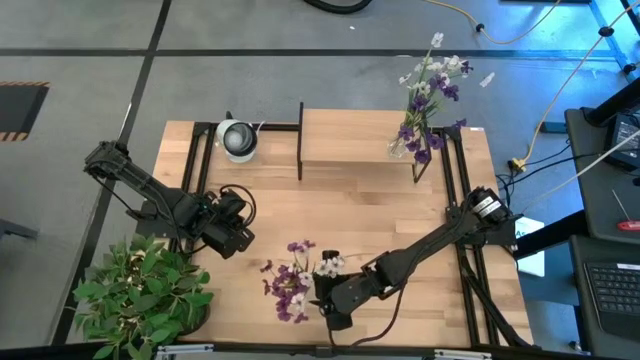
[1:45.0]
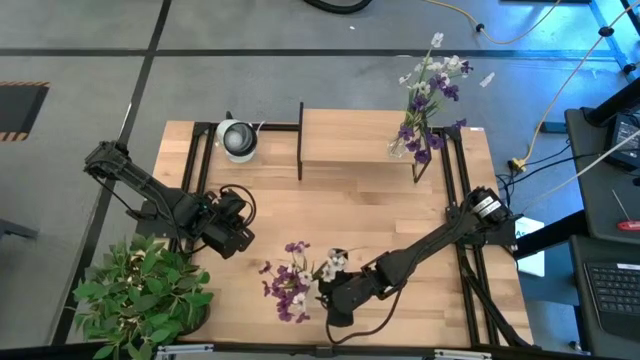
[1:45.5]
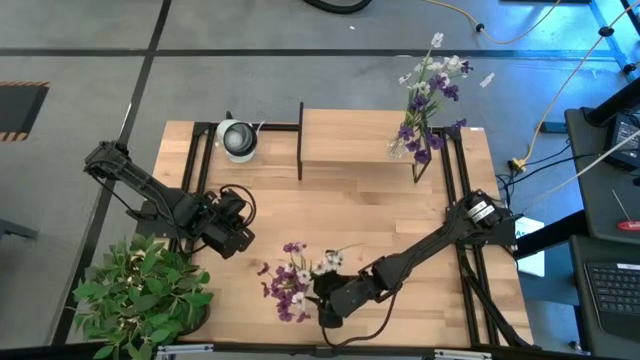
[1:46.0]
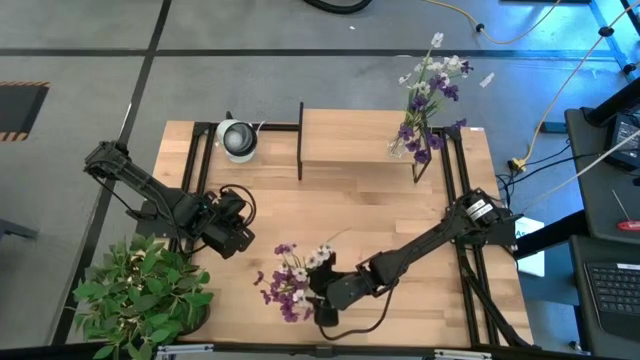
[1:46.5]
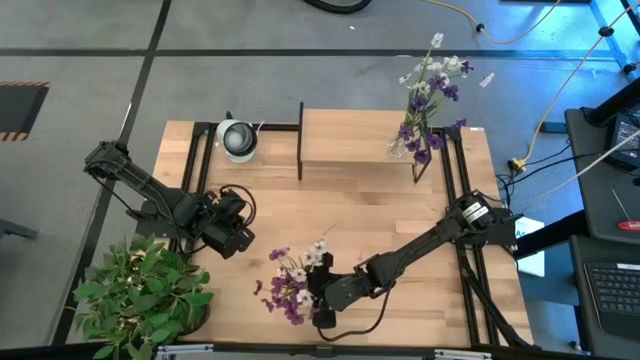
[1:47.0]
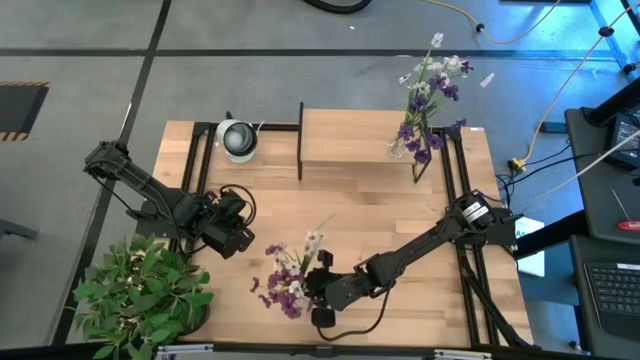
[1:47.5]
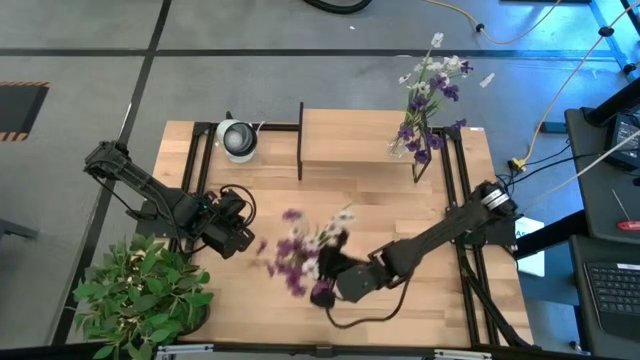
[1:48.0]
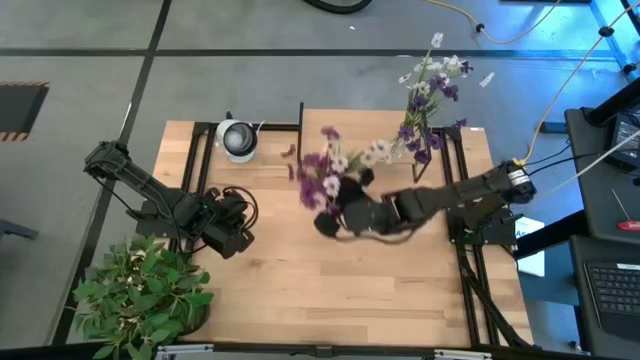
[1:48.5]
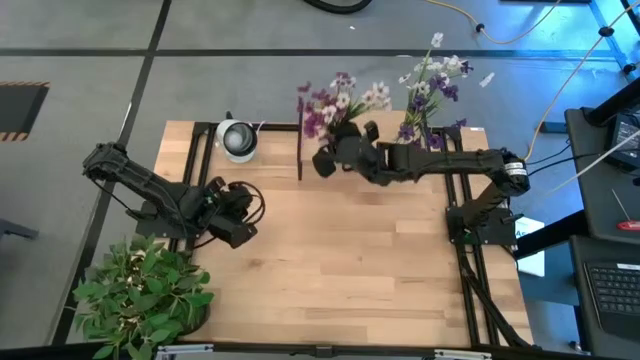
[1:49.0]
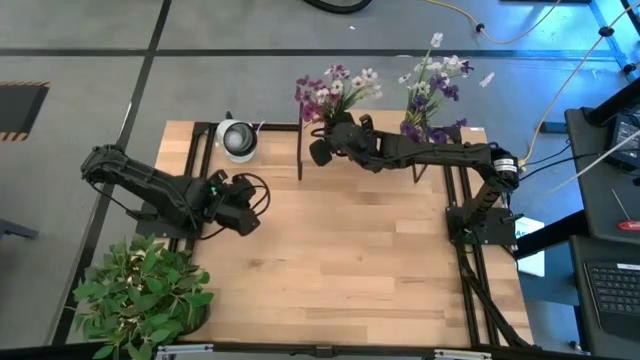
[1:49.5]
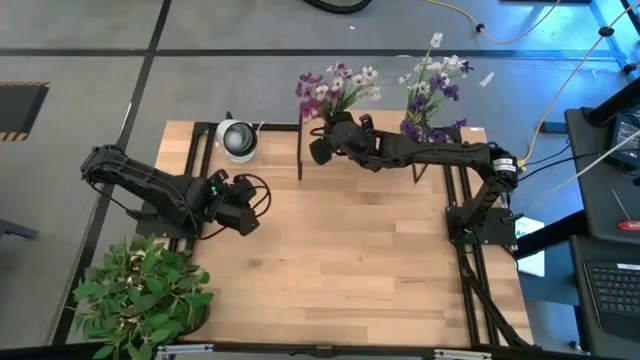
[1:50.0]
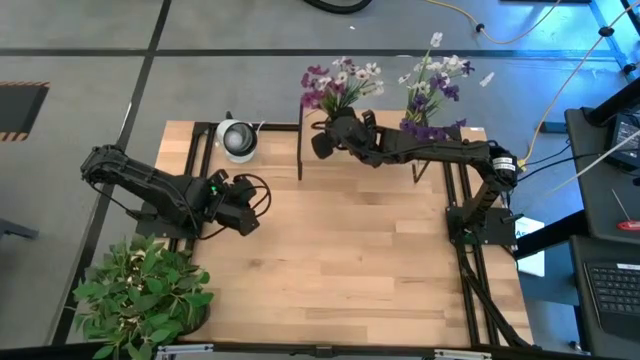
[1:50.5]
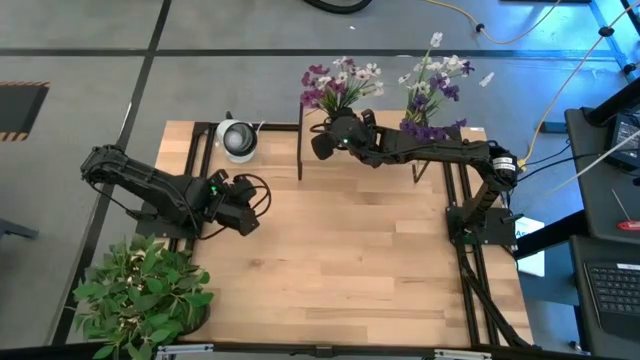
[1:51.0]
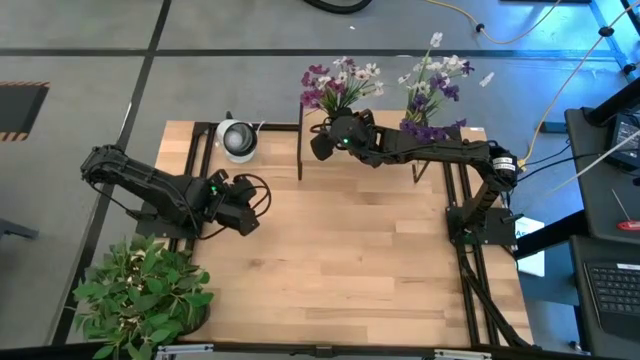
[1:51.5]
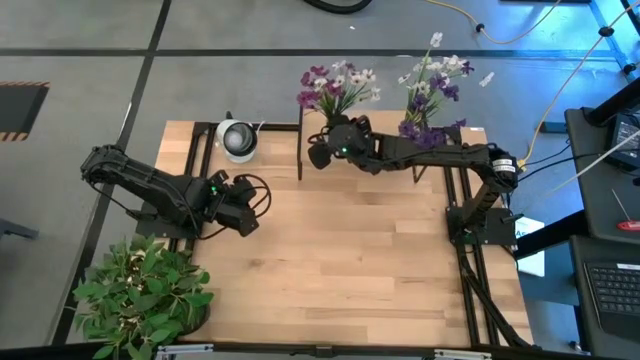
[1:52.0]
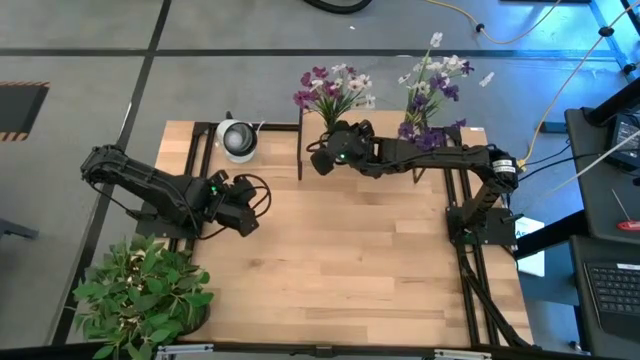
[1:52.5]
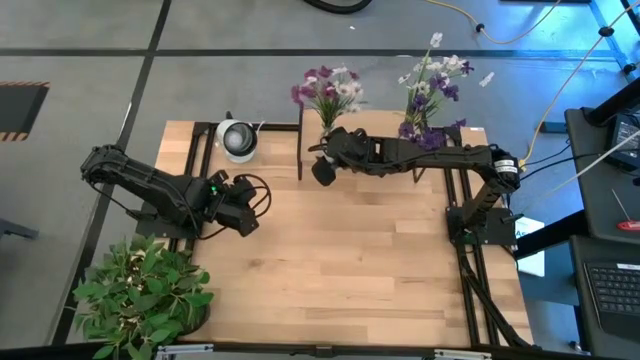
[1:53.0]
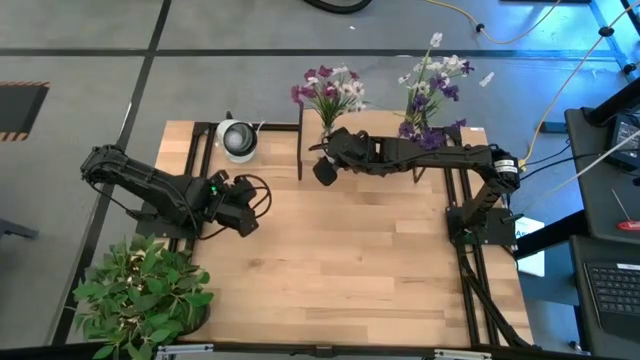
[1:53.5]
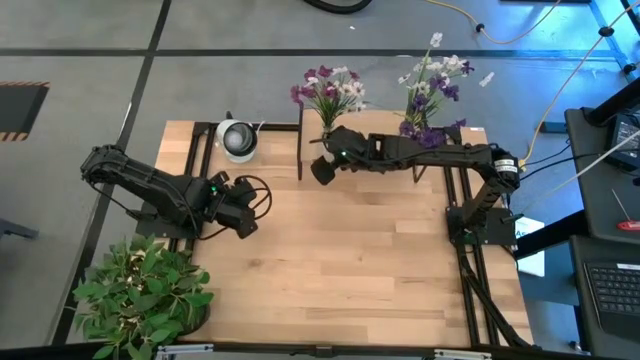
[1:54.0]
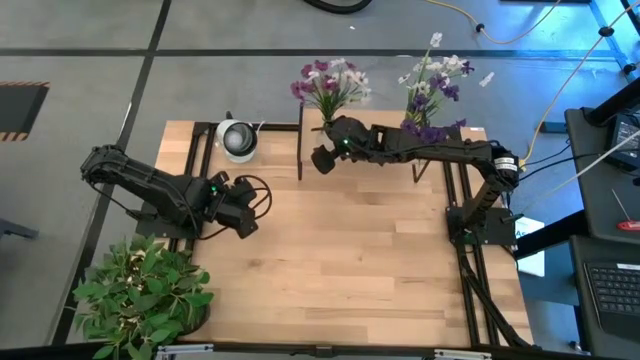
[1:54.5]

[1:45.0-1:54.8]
Task: Pick and place flowers into a vace then onto a shelf
Put the transparent vase on the shelf

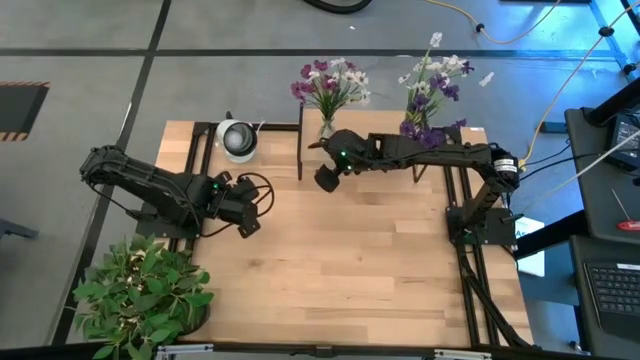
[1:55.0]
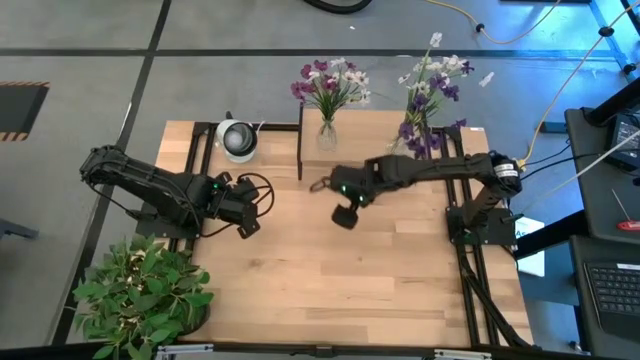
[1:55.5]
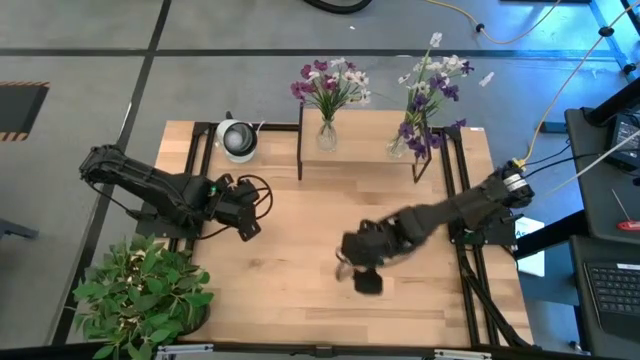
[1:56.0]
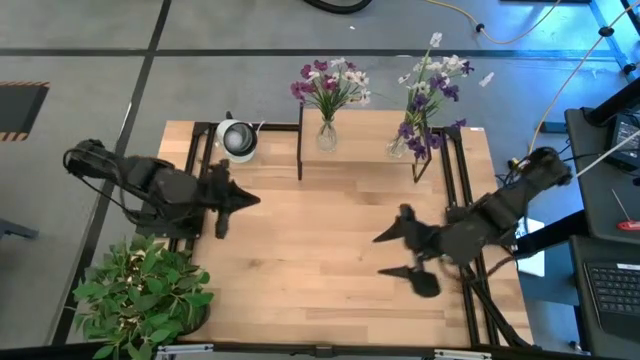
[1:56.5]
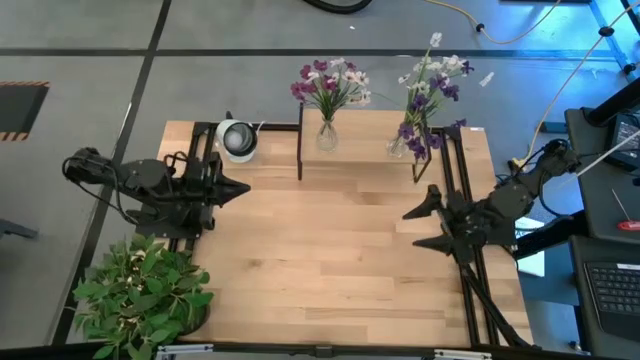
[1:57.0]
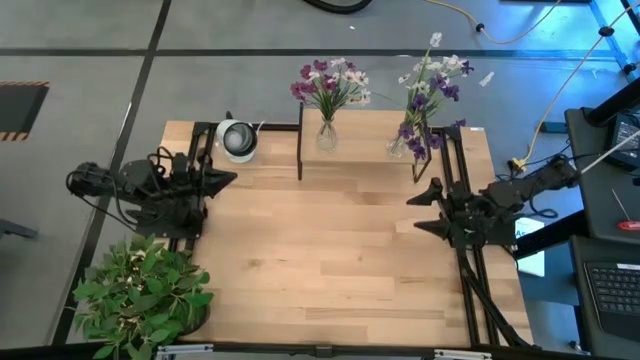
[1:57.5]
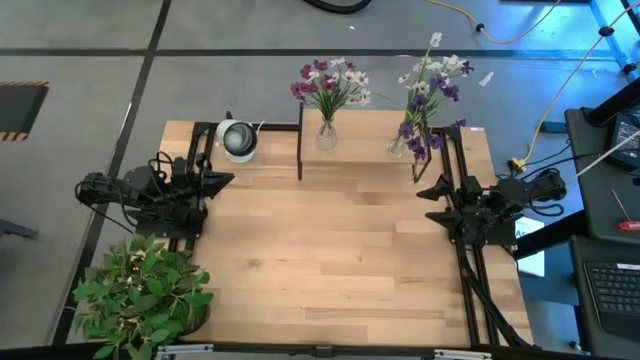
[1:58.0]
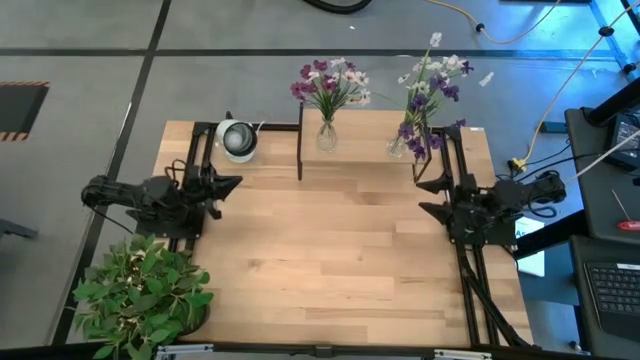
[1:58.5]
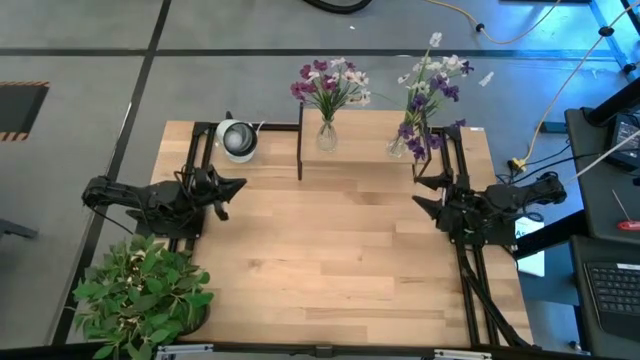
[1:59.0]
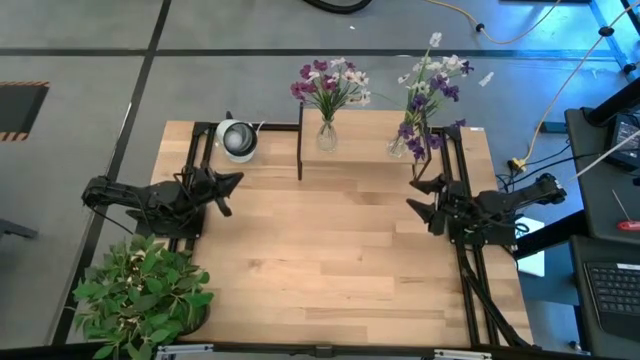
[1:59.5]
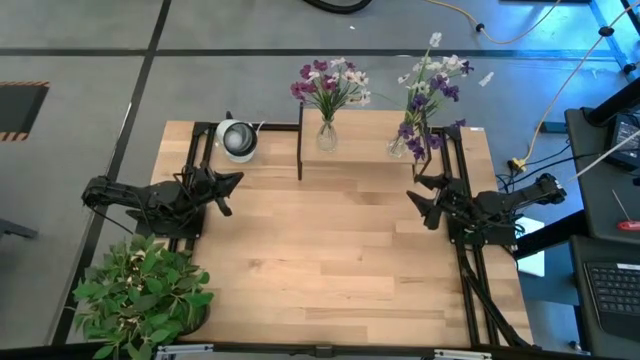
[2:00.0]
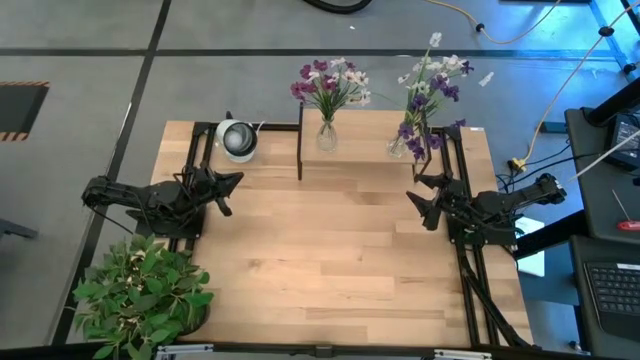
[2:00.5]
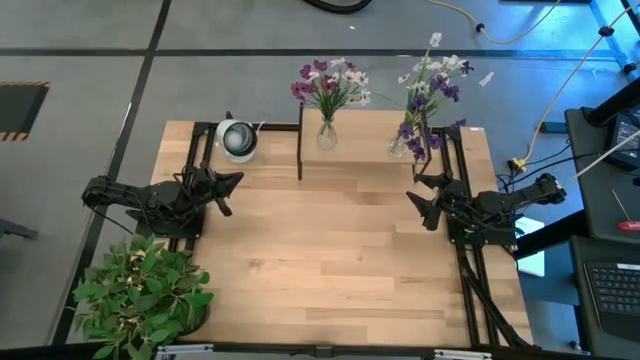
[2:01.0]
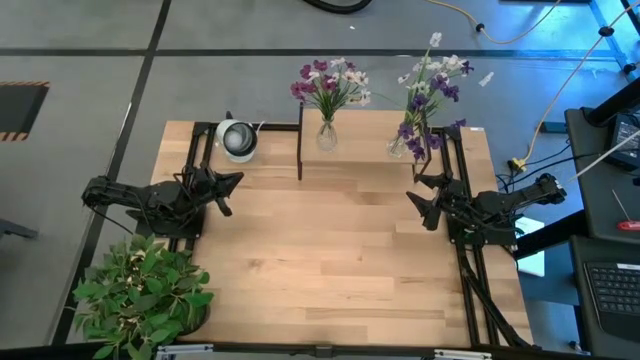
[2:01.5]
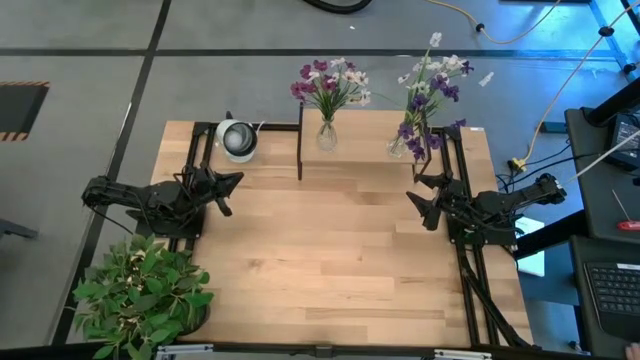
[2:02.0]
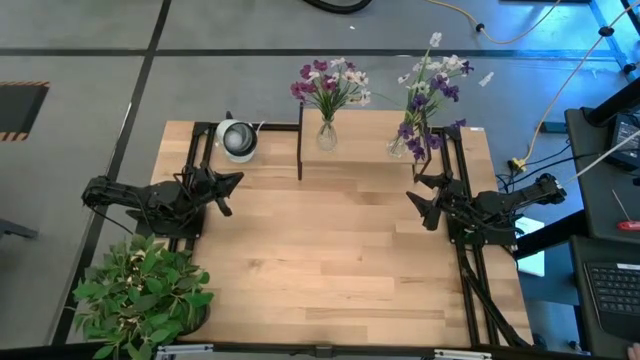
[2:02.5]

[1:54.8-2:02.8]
Return to Home Position

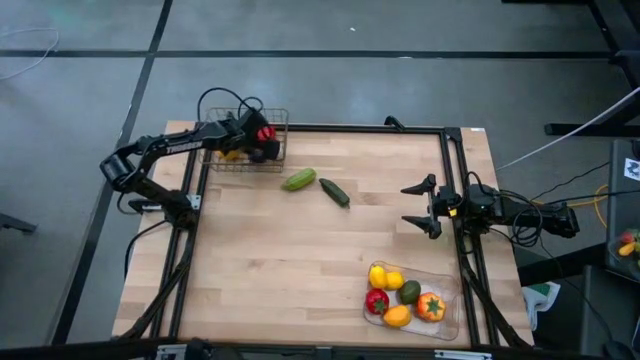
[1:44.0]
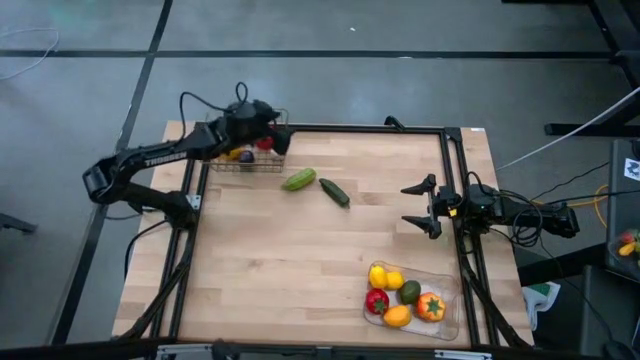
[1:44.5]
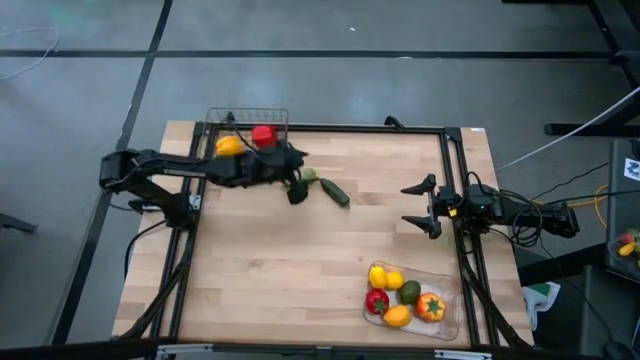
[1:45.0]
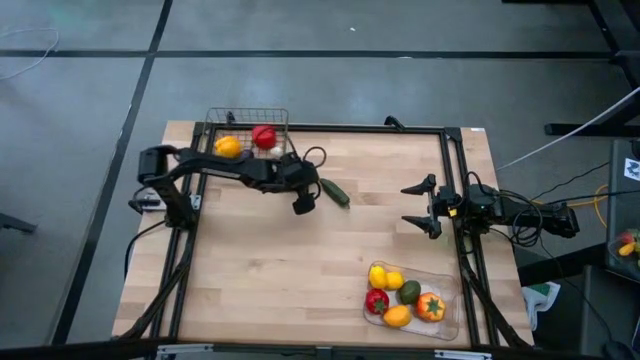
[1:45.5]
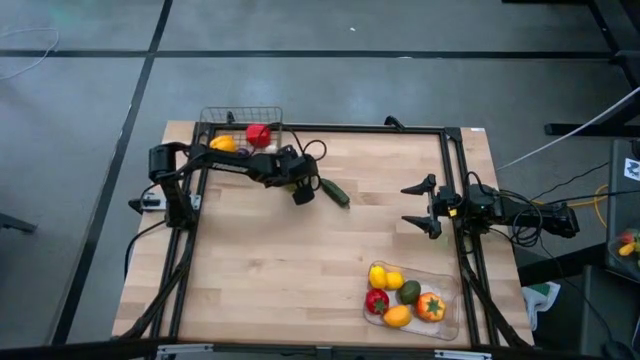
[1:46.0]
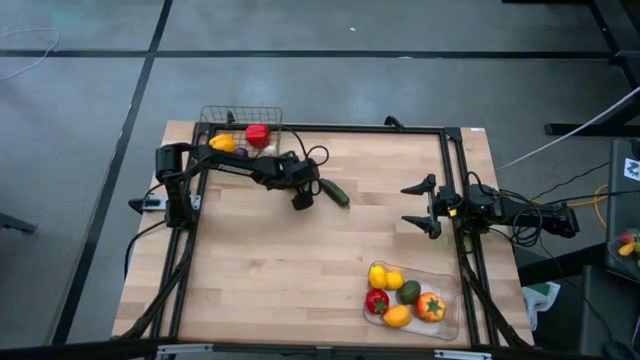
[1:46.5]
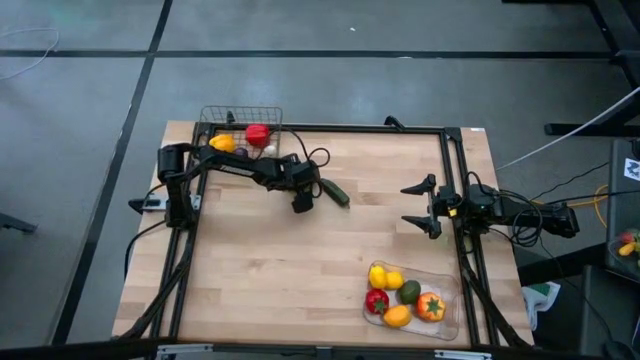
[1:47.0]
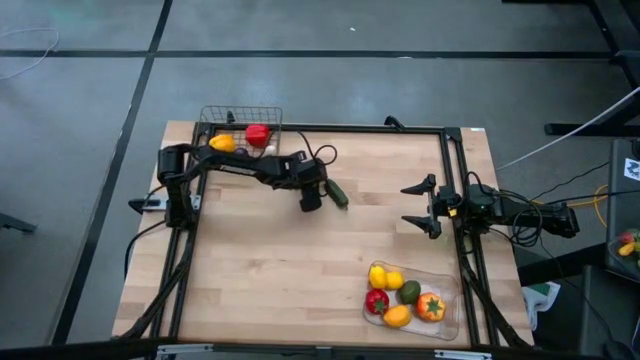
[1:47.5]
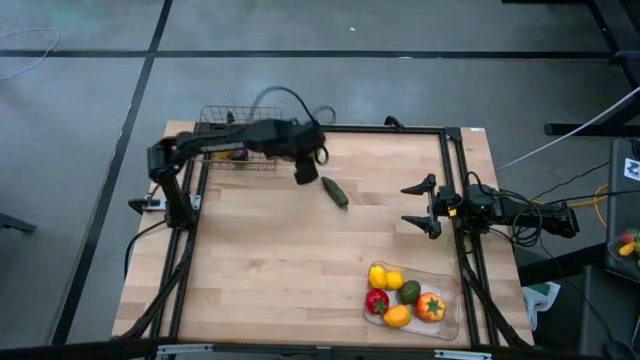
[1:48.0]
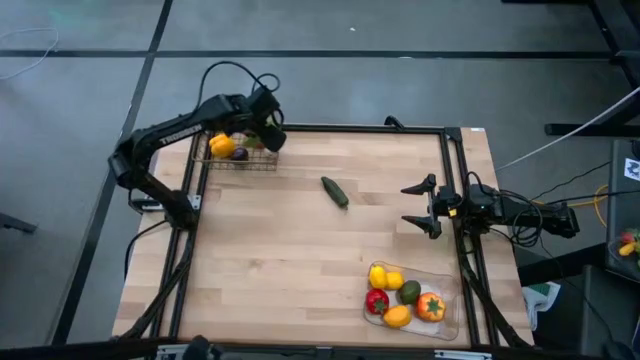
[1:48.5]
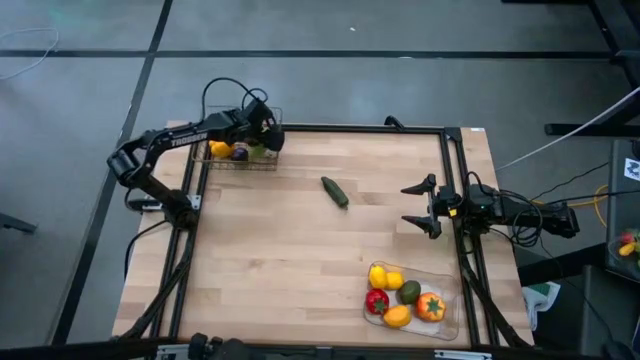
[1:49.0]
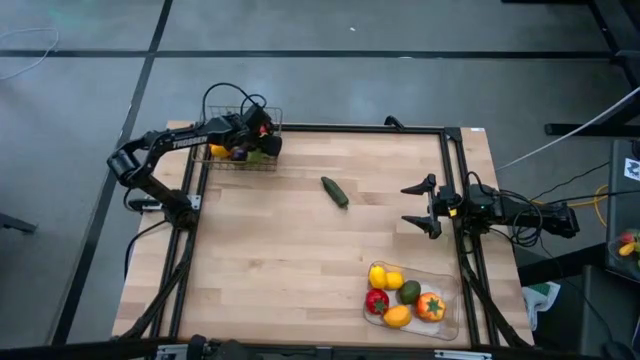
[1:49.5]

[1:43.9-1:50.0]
Task: Sort produce into baskets
Put the chayote into the mesh basket
